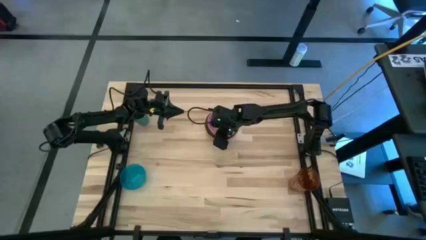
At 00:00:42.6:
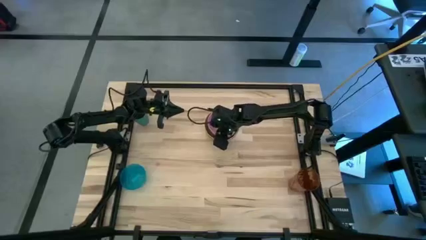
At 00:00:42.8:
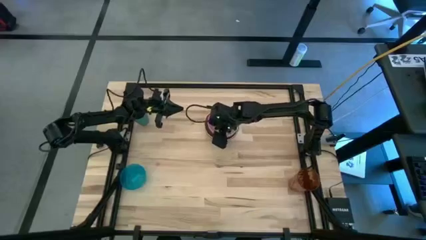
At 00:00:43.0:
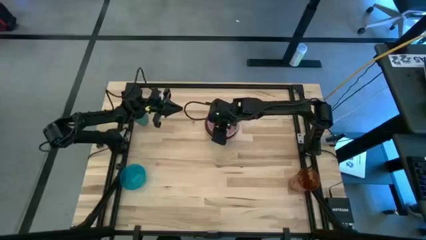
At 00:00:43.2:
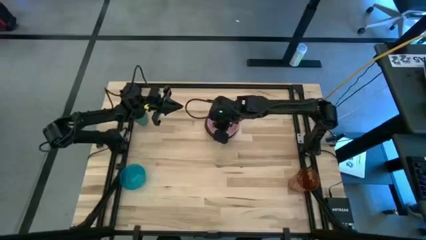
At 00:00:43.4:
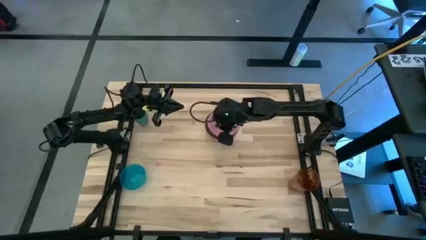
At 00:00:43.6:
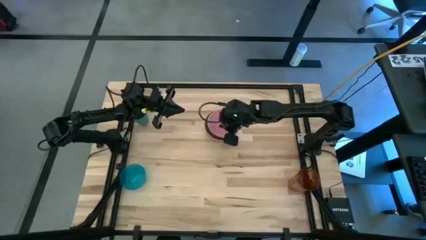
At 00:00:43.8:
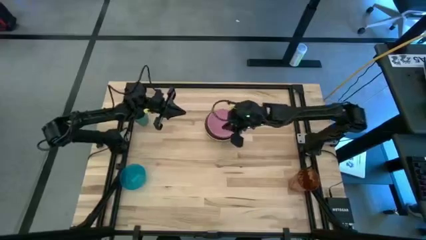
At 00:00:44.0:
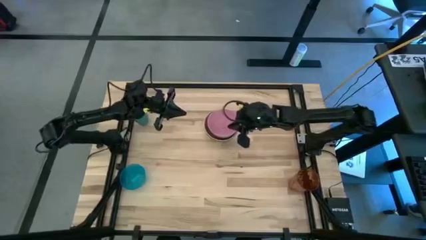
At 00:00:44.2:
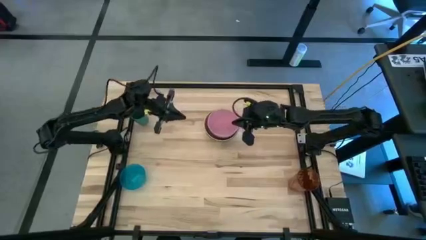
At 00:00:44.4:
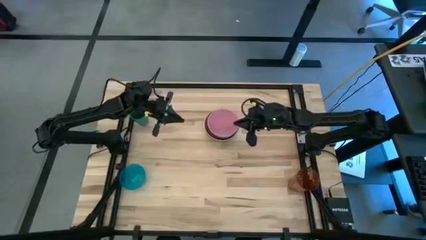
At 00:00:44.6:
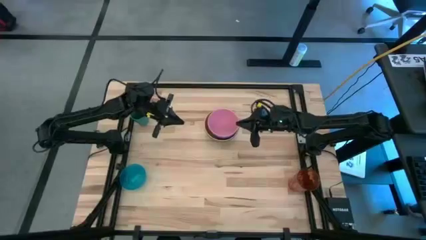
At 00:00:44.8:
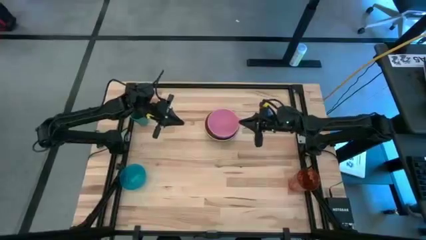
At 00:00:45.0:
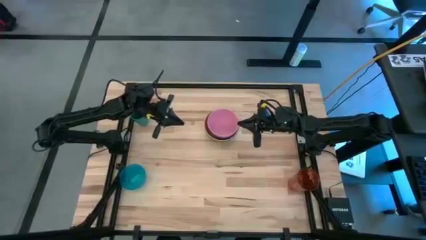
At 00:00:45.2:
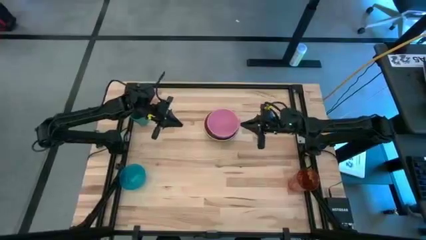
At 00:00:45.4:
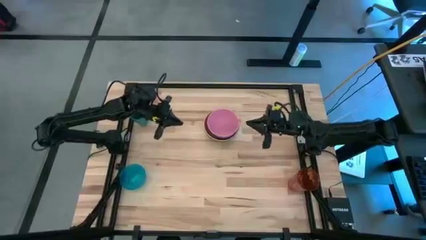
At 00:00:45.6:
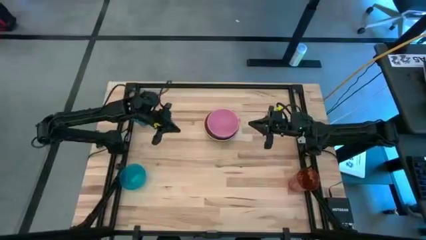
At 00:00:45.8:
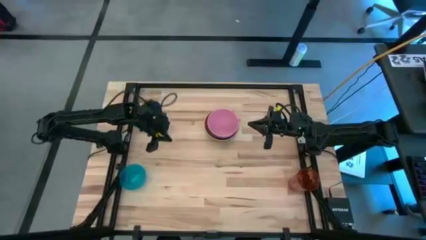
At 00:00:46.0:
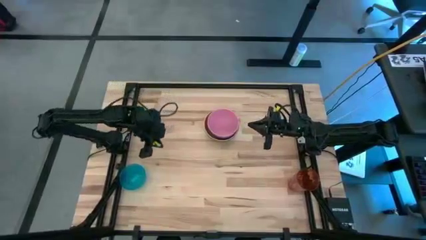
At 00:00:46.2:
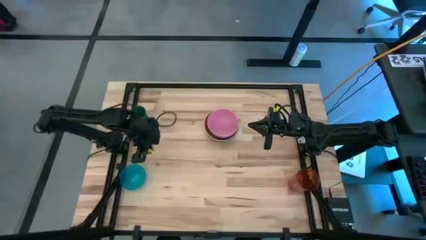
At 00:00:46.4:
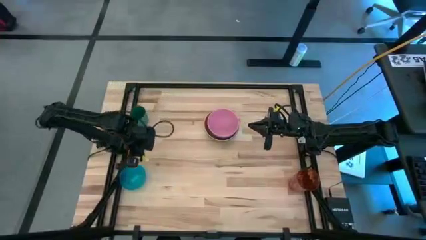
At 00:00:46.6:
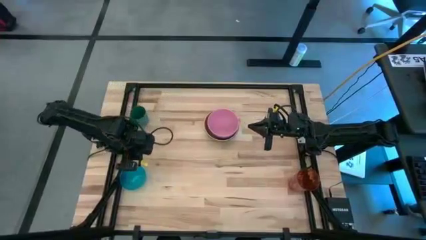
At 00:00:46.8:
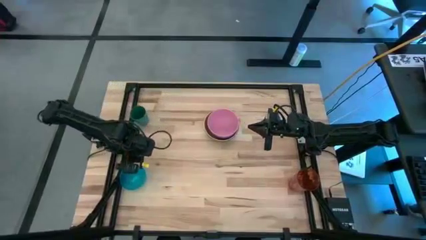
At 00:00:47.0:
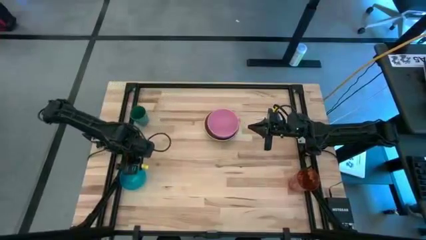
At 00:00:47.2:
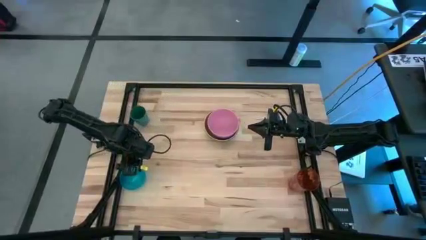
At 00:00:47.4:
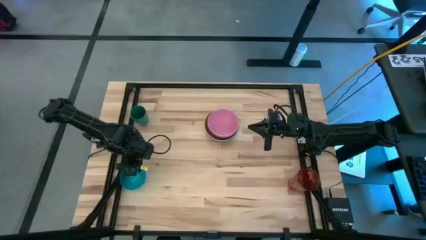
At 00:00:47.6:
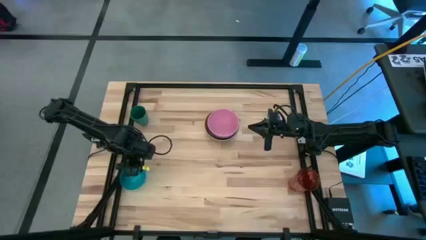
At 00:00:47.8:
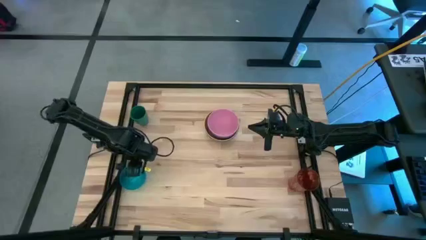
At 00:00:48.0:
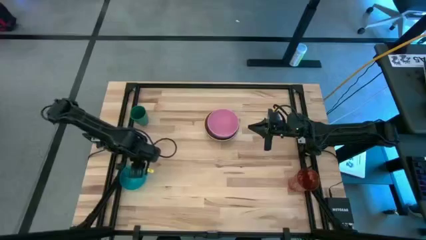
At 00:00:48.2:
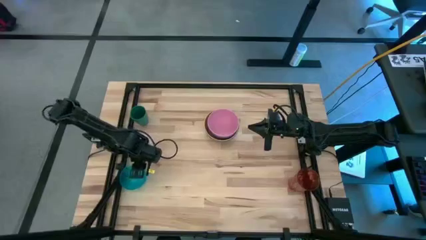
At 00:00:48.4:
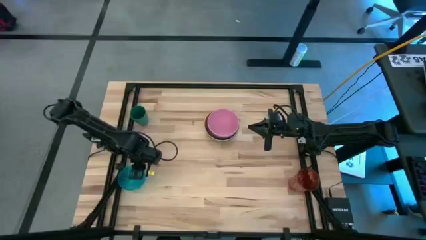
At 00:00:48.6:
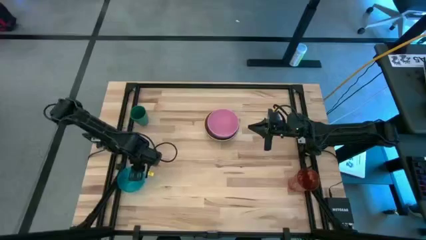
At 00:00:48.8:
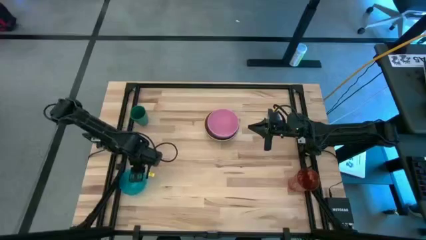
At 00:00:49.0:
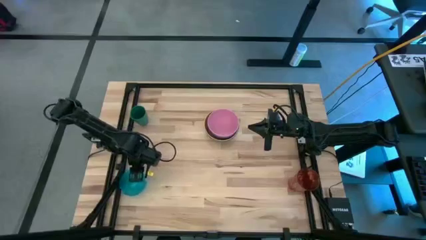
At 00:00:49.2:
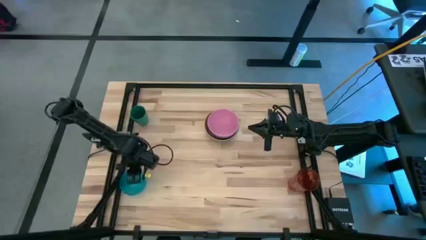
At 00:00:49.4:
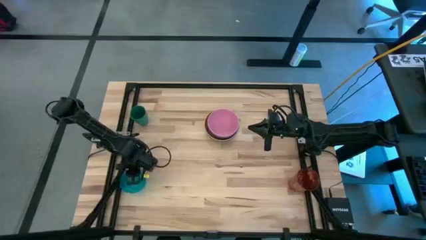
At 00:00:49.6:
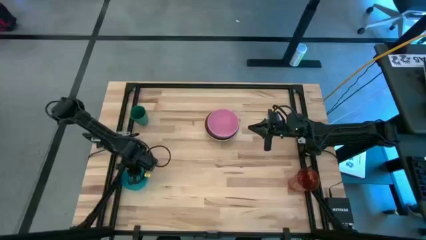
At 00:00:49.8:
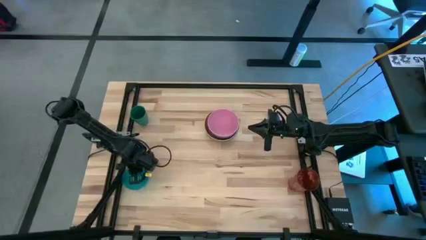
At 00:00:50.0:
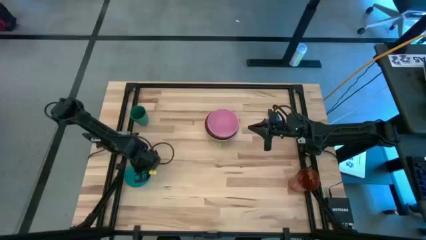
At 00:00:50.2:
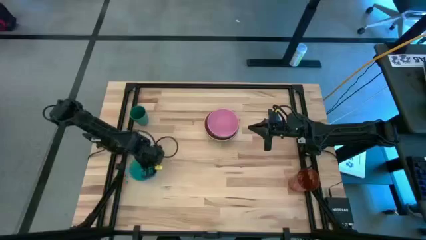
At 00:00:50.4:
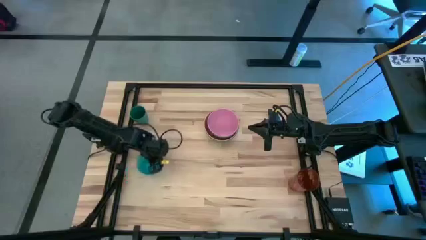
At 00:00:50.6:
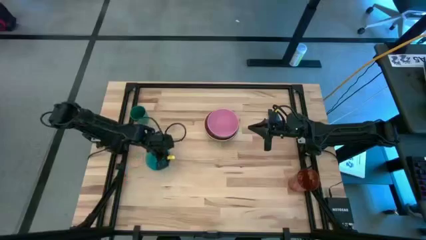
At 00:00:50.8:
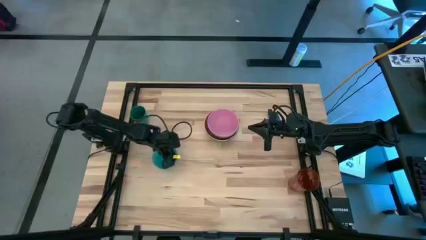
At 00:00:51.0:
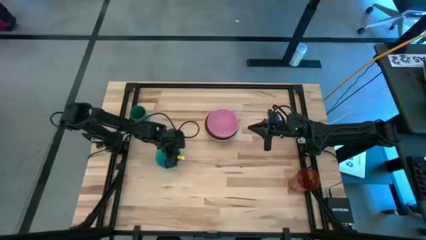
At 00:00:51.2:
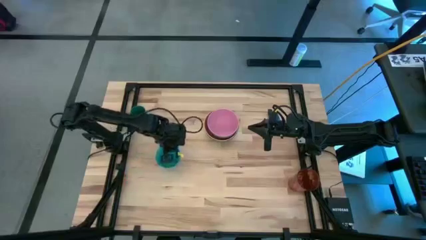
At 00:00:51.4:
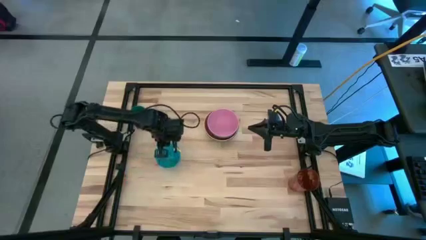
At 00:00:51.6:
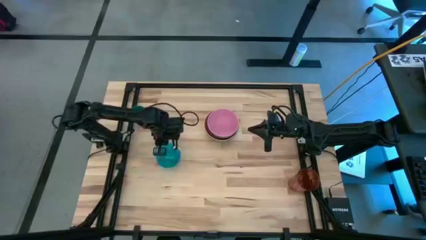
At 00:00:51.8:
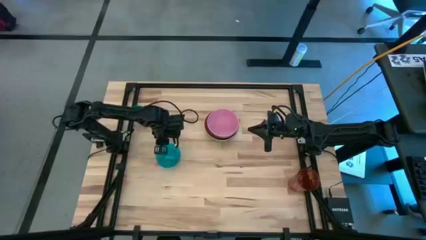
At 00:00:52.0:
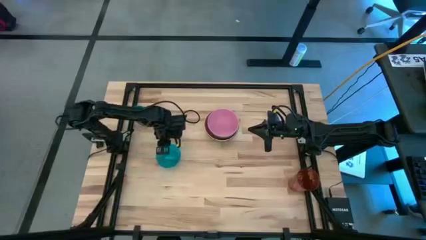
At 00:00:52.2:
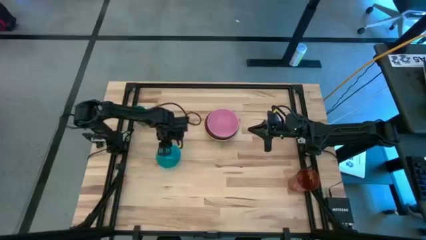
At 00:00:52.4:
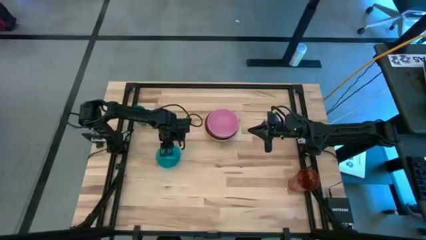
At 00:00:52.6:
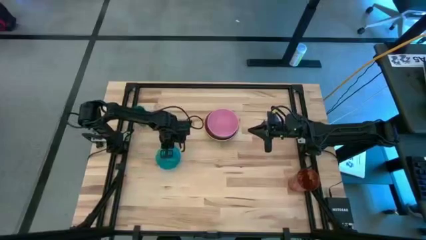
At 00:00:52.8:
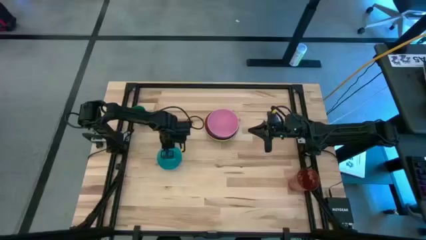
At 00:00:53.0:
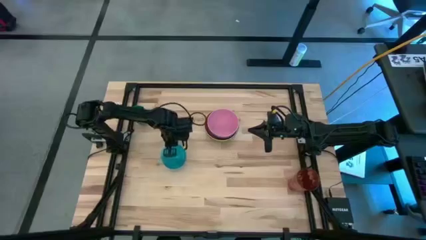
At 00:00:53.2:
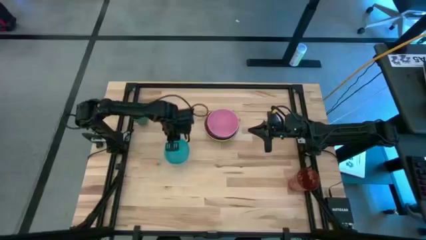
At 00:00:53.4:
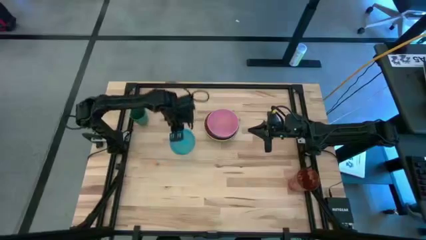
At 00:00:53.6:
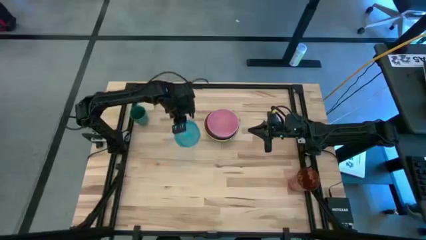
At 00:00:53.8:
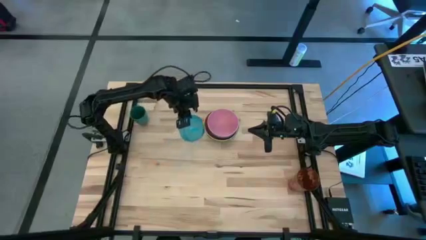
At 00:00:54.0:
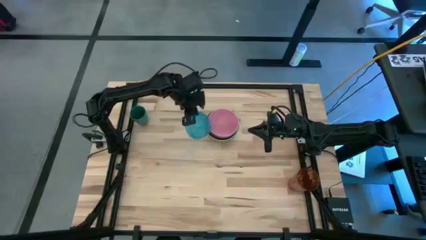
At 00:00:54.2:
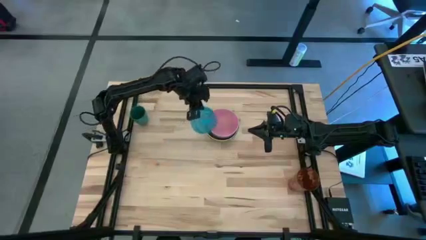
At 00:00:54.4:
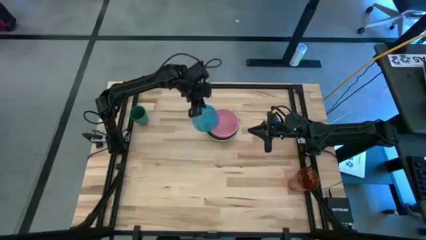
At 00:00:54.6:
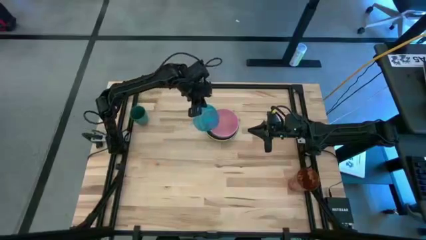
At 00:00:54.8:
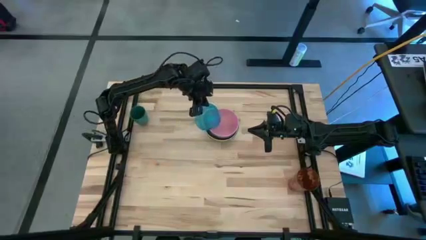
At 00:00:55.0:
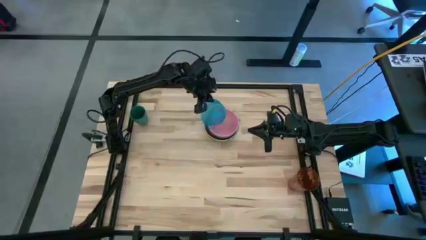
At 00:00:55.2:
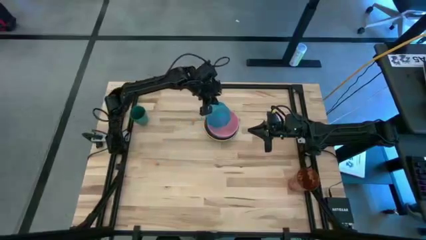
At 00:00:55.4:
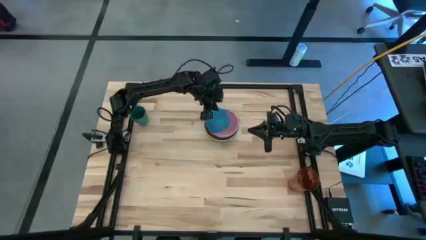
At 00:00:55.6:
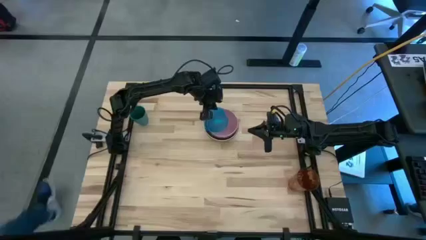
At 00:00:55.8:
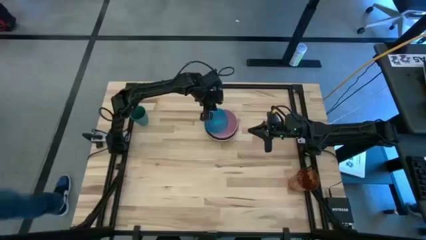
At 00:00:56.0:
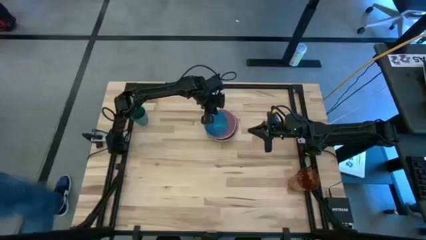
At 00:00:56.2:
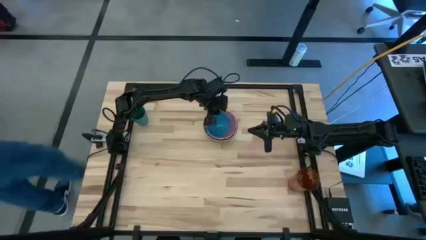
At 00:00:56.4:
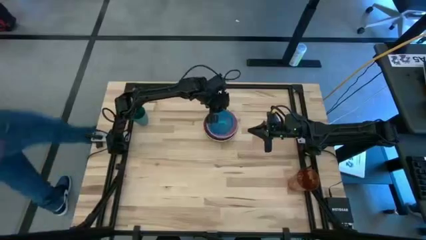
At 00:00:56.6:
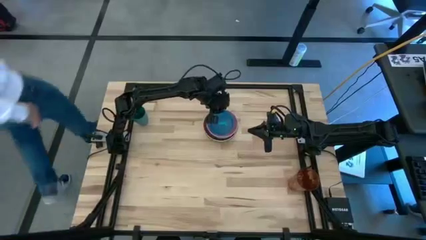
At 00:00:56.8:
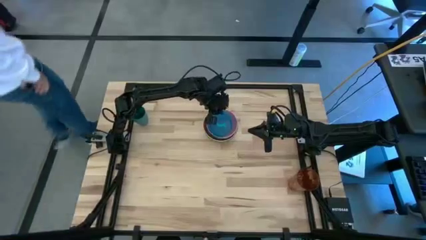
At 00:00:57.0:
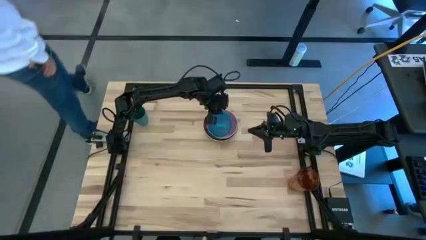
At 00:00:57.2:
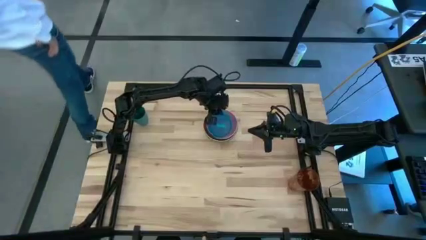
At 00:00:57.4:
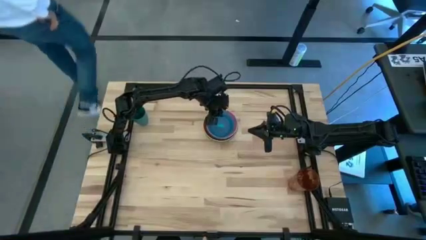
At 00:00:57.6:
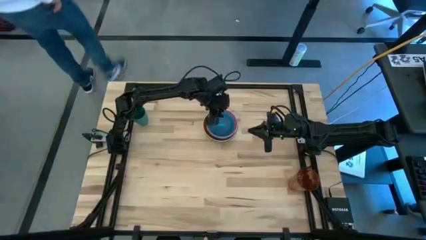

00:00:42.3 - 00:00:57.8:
Stack the light blue bowl on top of the pink bowl
